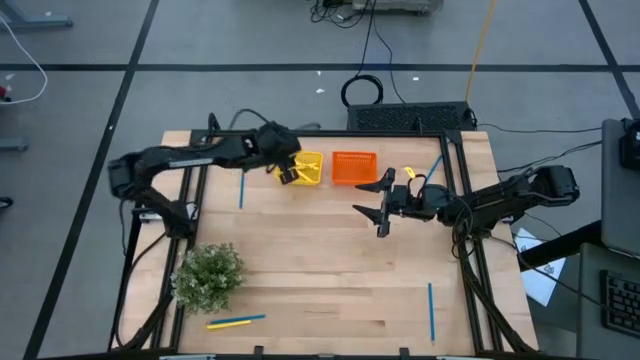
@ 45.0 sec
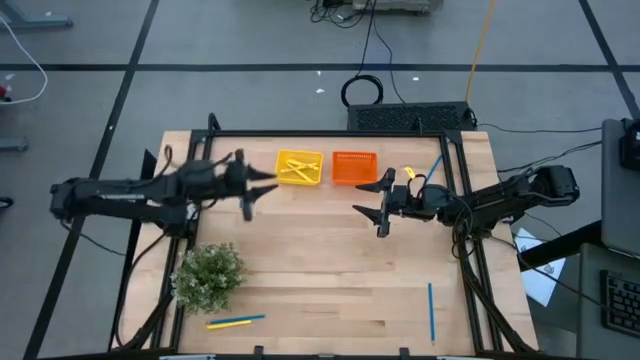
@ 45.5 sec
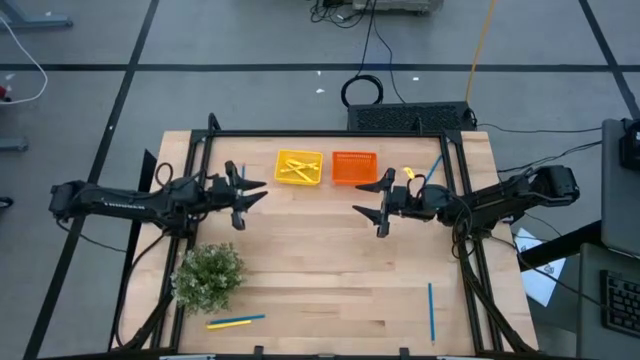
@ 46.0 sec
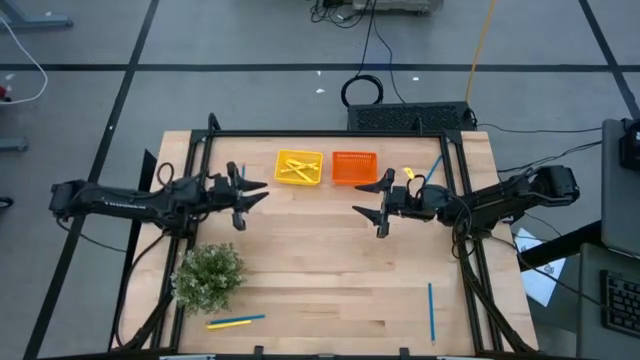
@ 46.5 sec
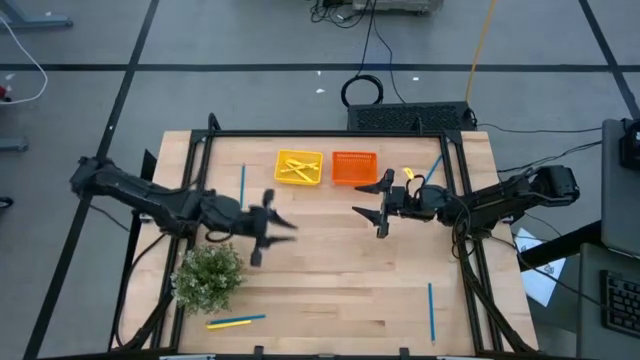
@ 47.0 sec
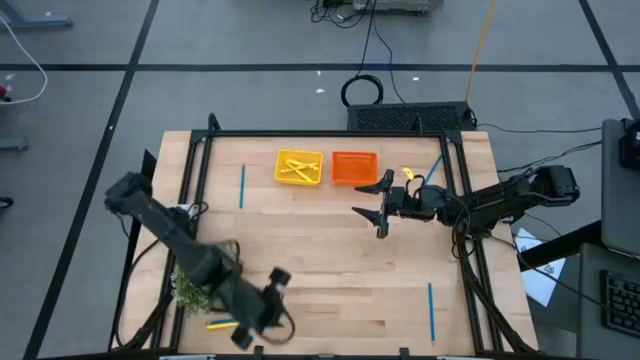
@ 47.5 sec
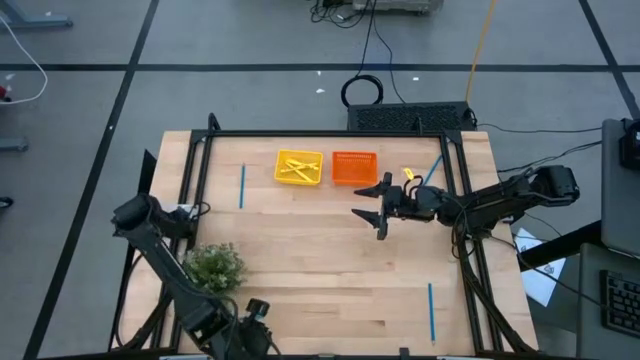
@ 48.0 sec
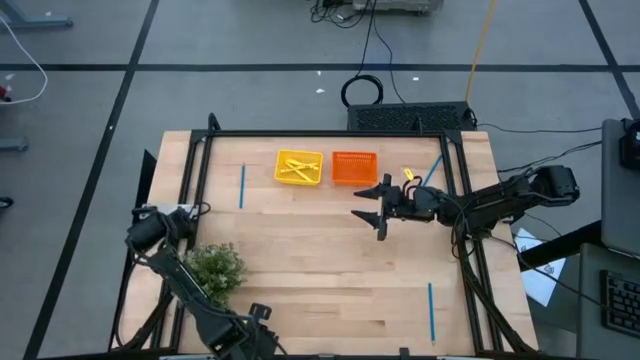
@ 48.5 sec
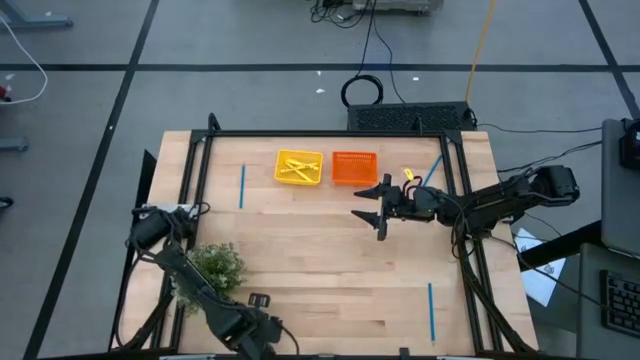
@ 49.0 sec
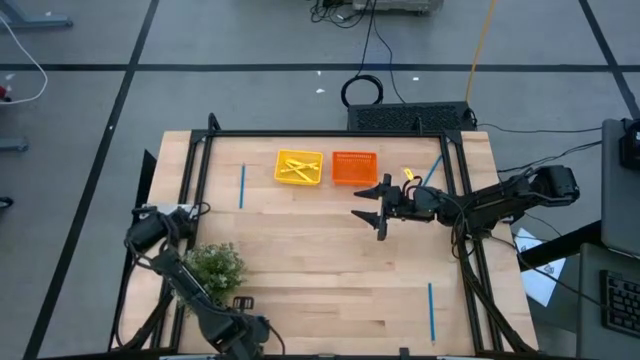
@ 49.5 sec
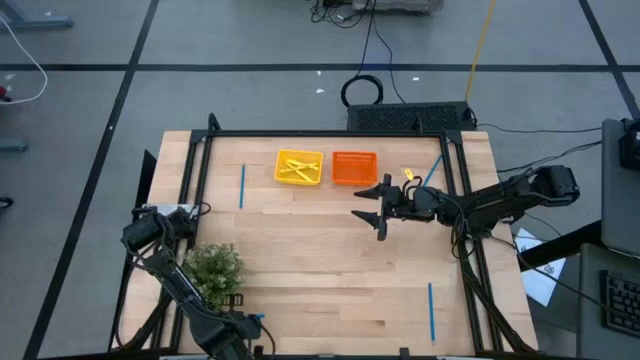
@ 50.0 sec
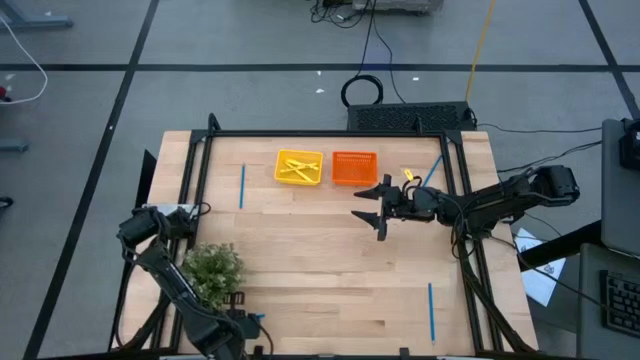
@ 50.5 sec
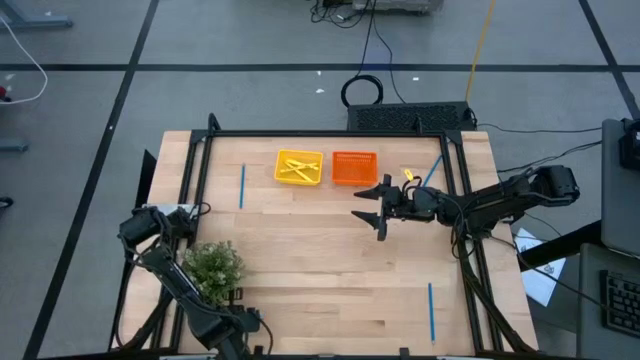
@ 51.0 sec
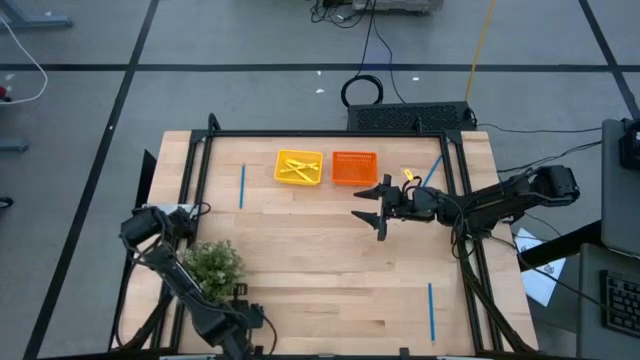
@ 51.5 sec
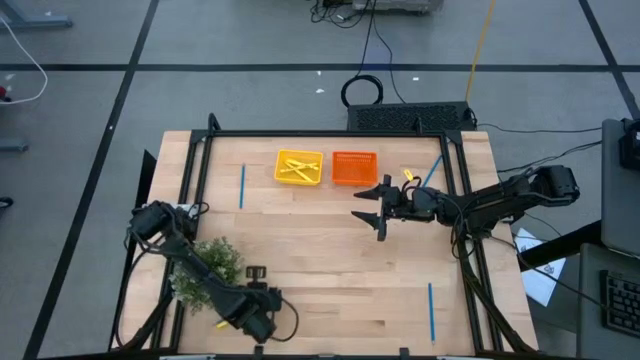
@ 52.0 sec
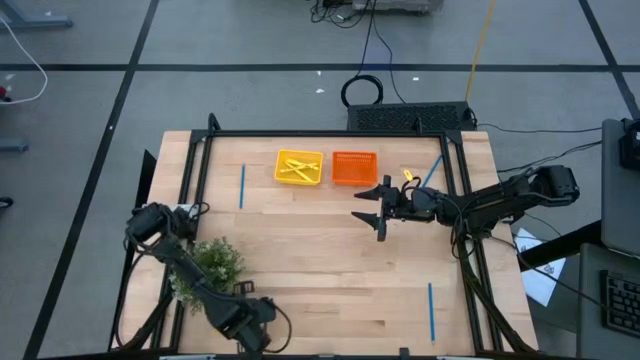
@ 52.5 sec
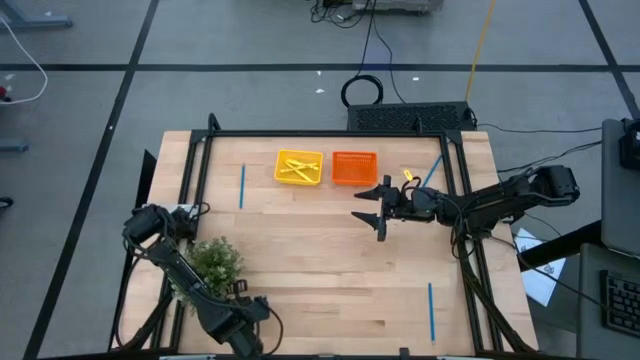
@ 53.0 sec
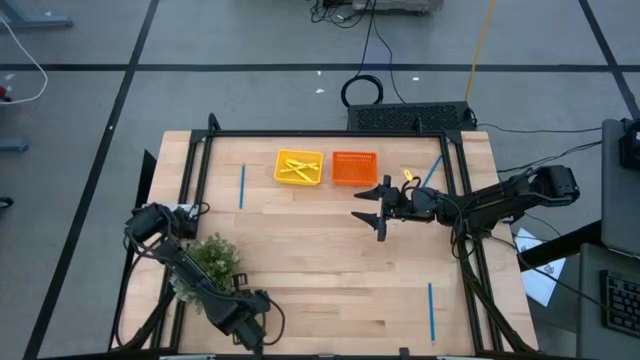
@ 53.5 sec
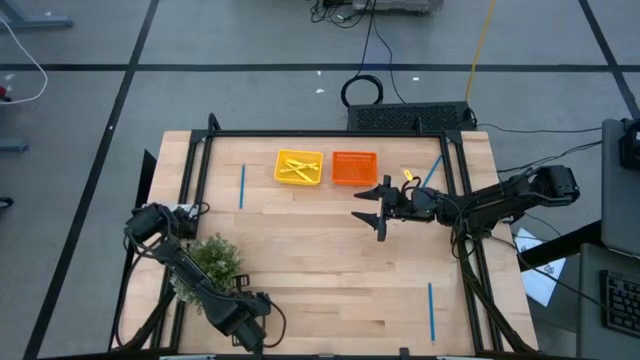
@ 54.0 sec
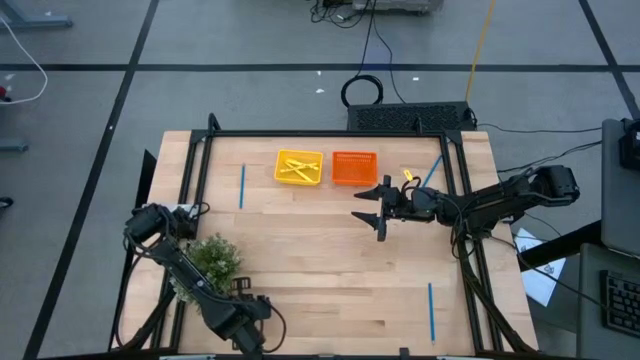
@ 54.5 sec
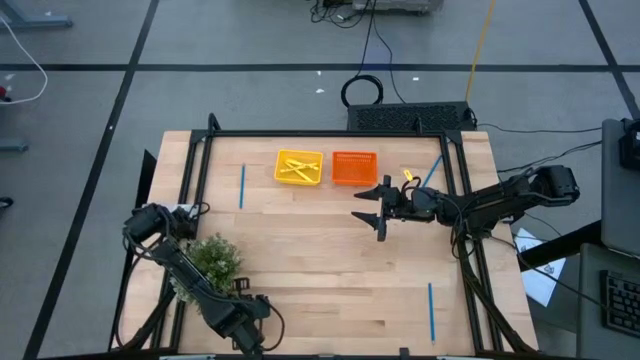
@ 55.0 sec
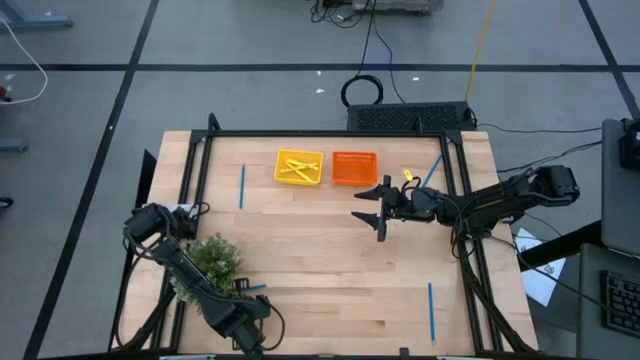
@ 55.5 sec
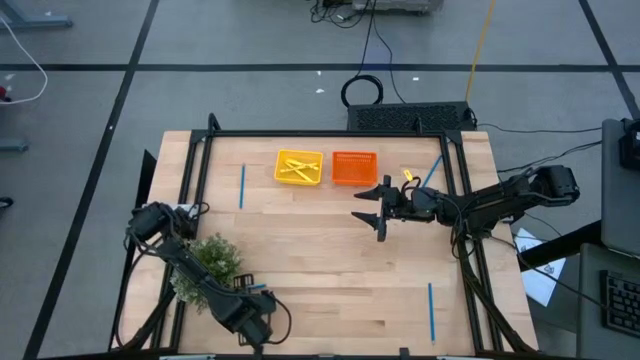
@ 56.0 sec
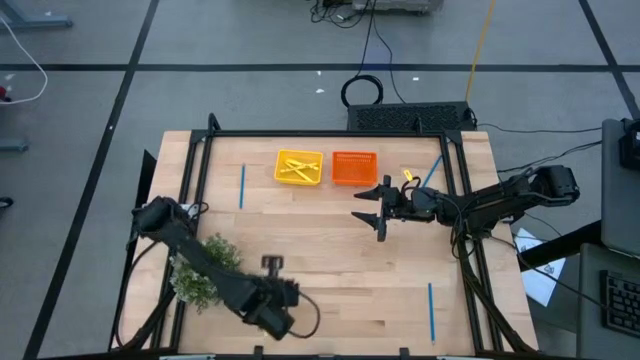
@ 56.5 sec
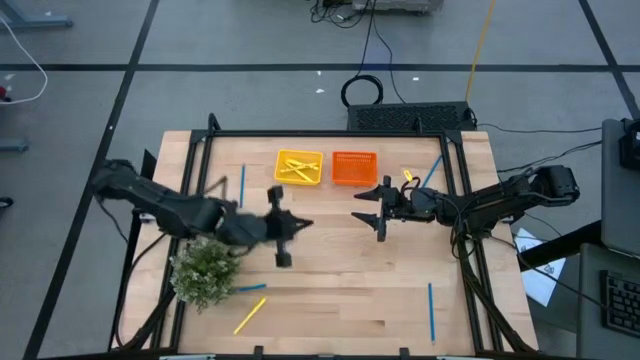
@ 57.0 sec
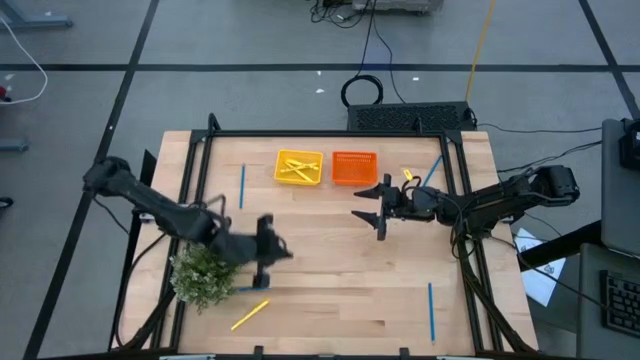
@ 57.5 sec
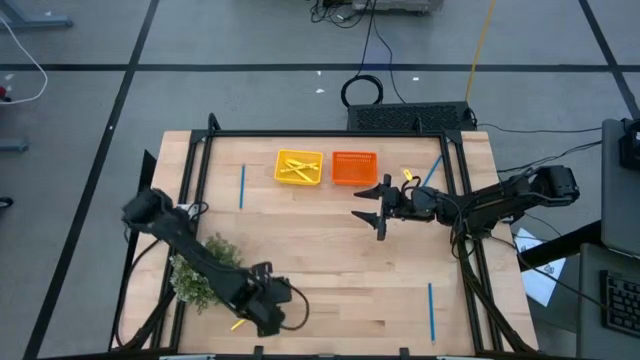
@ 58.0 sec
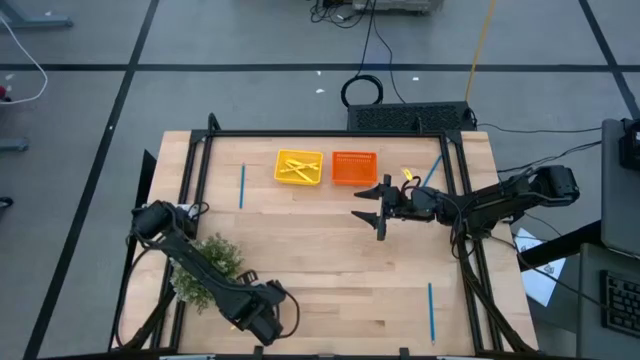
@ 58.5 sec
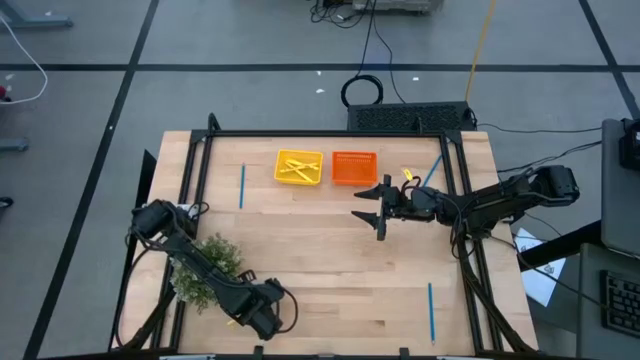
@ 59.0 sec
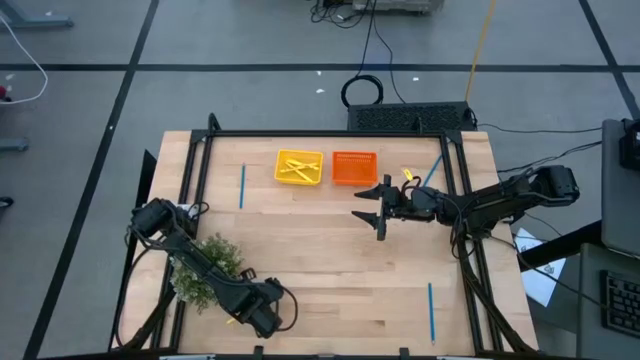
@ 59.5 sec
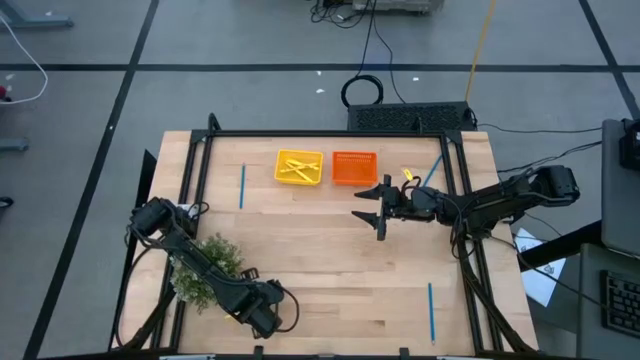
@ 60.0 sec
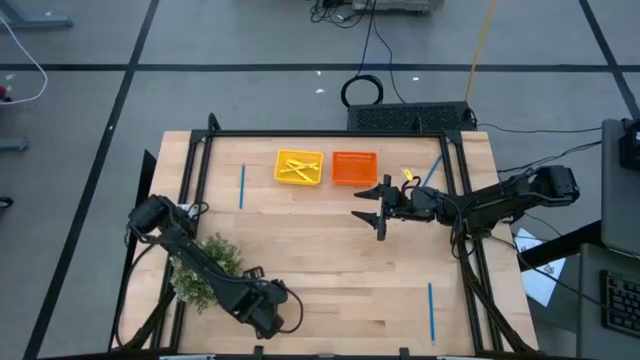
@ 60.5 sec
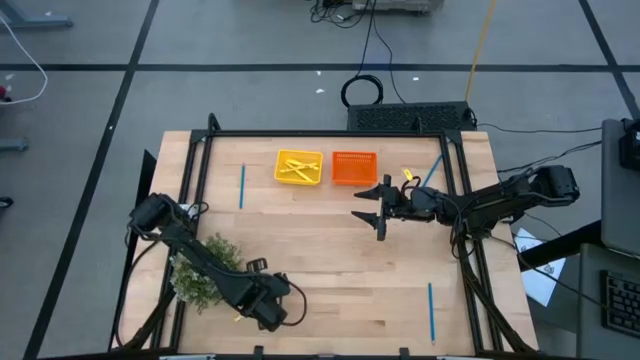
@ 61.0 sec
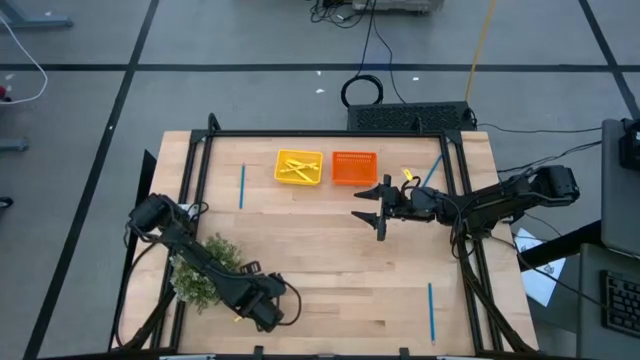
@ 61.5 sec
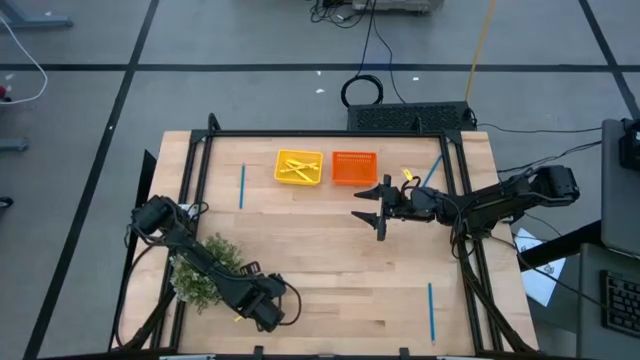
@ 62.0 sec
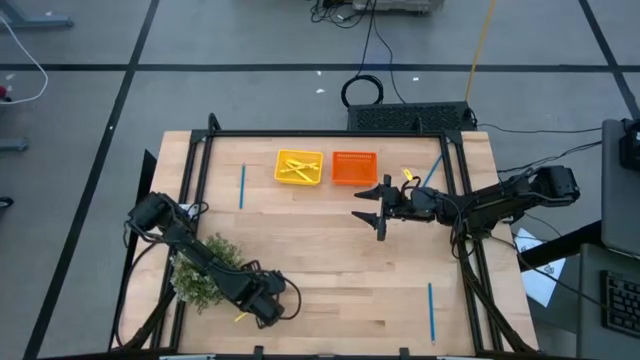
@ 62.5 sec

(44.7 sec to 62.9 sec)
Task: Sort pens & pencils
Put the yellow pen into the yellow bin

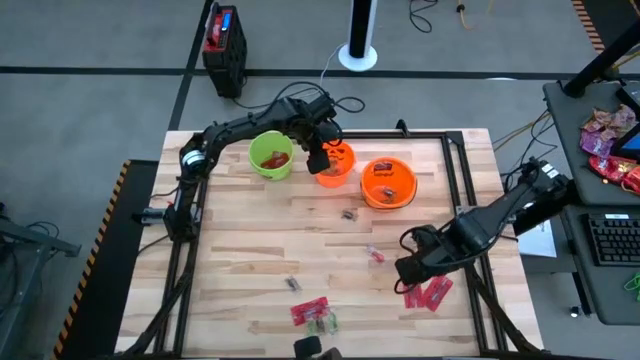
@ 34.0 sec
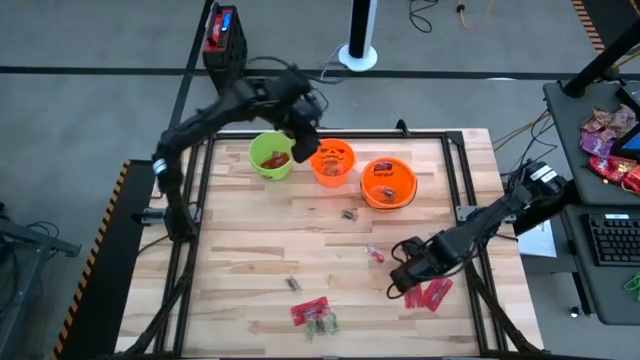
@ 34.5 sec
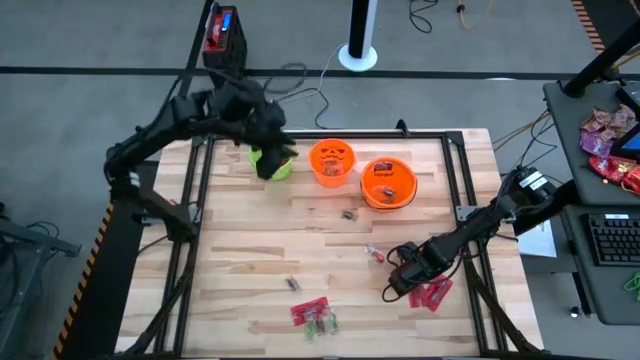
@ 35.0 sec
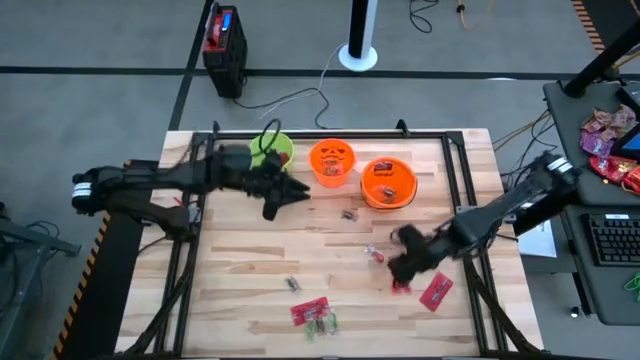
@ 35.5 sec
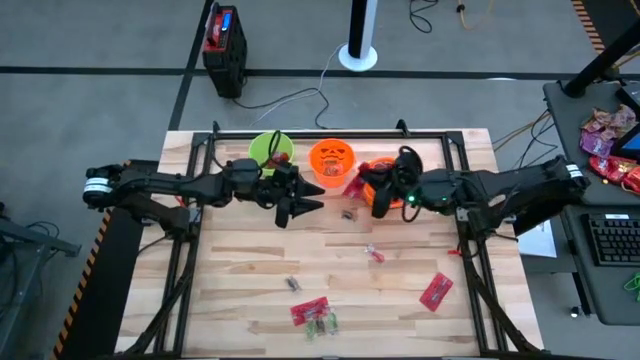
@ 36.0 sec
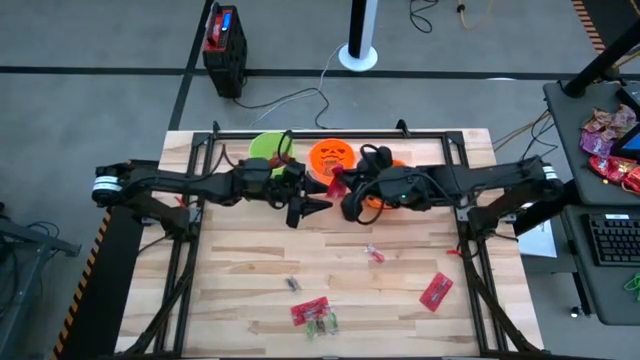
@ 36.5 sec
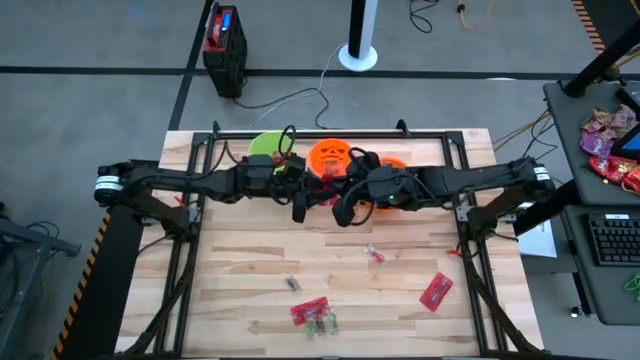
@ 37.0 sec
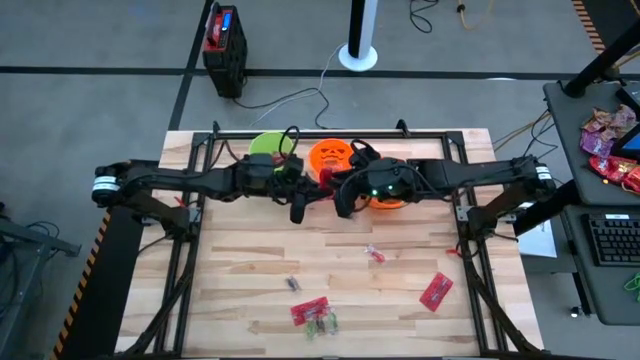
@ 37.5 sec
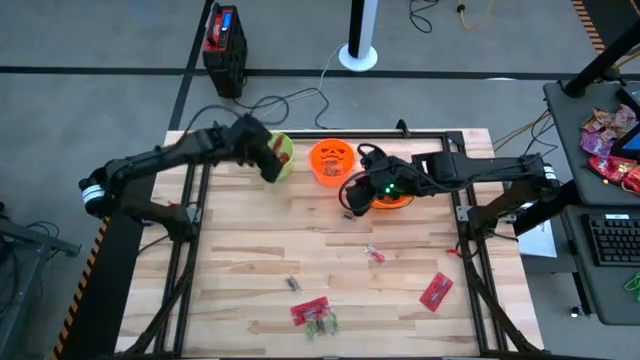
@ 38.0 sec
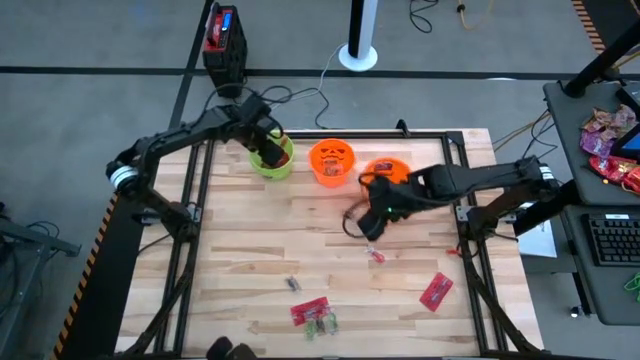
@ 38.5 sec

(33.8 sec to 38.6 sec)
Task: Sort candy by brand, put in halloween buckets
Put the red candy into the green bucket
